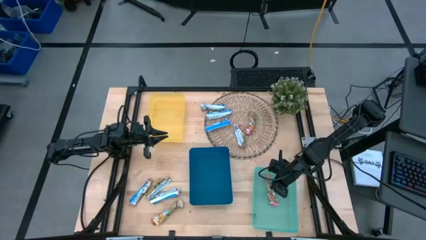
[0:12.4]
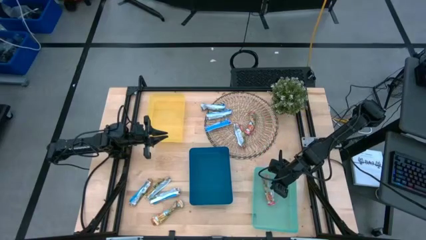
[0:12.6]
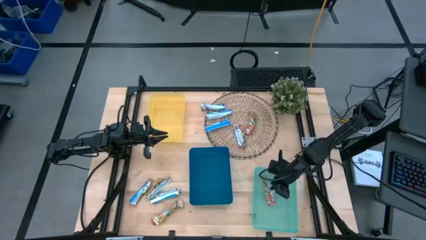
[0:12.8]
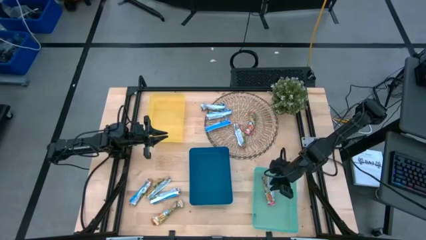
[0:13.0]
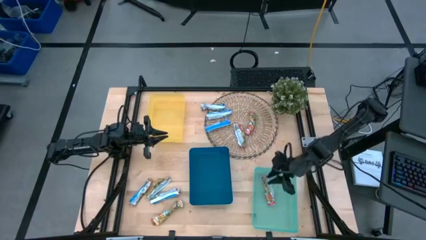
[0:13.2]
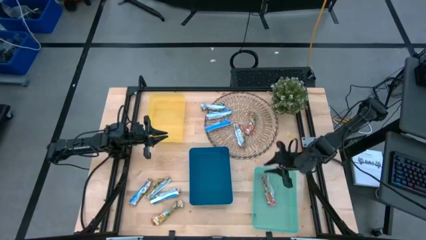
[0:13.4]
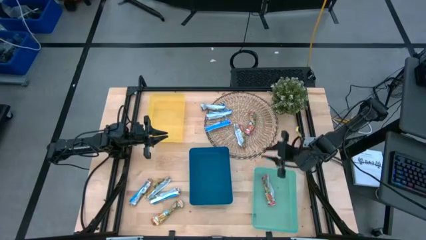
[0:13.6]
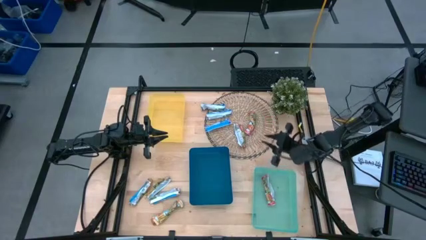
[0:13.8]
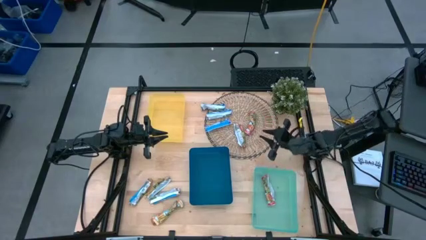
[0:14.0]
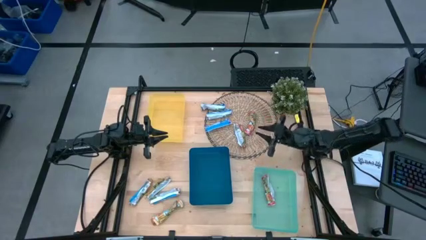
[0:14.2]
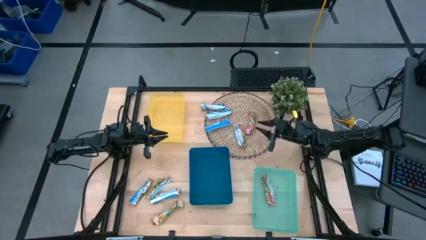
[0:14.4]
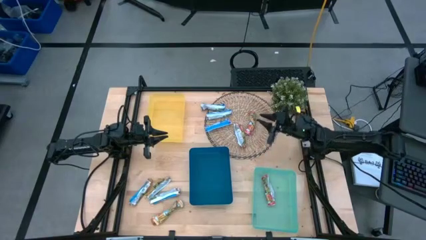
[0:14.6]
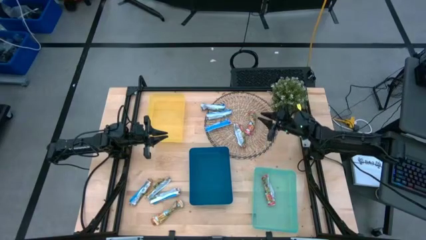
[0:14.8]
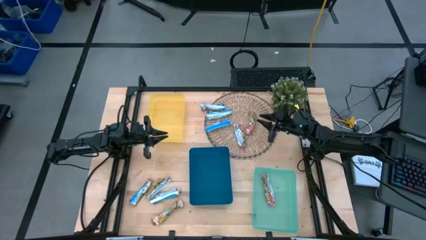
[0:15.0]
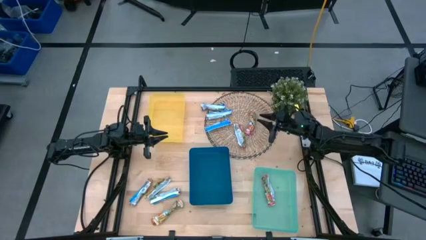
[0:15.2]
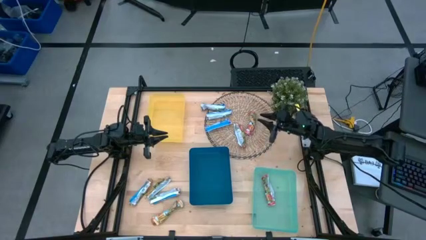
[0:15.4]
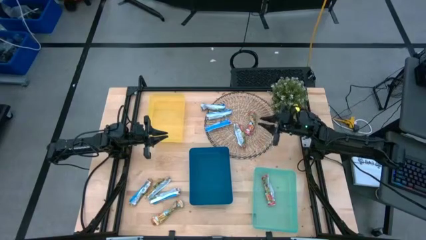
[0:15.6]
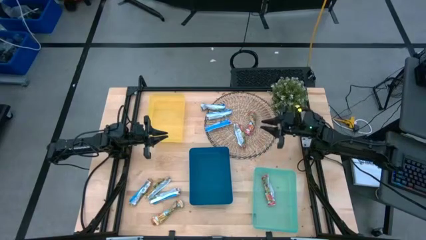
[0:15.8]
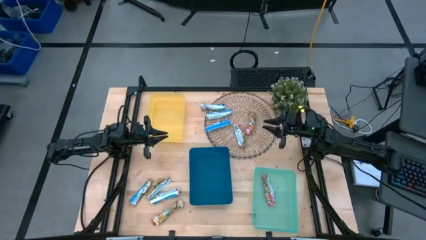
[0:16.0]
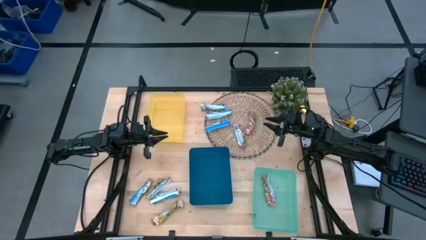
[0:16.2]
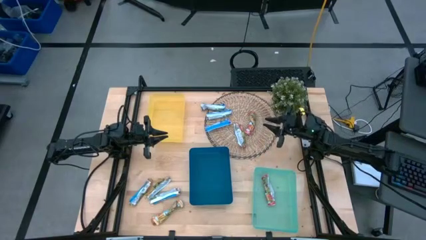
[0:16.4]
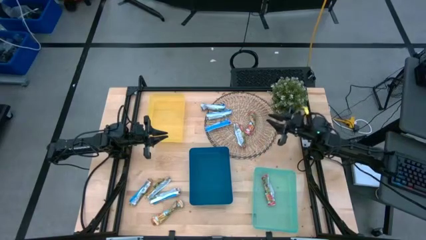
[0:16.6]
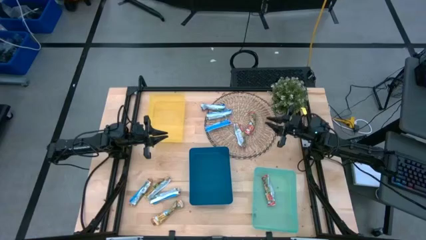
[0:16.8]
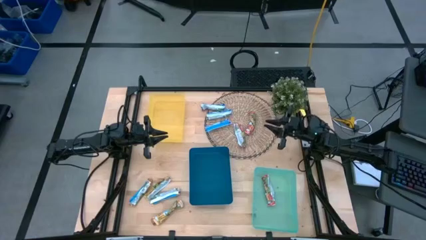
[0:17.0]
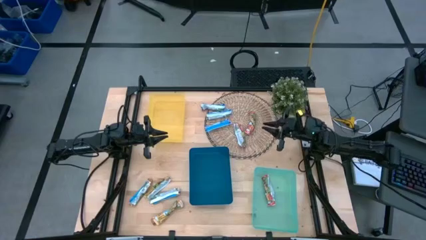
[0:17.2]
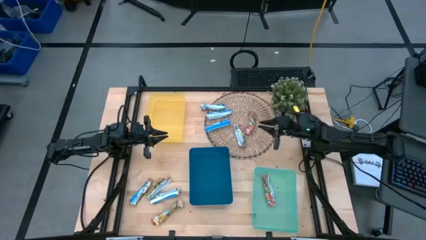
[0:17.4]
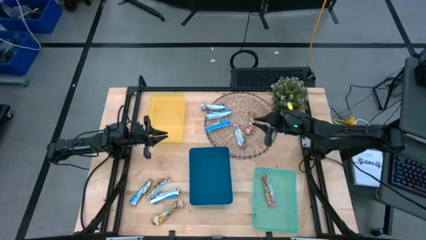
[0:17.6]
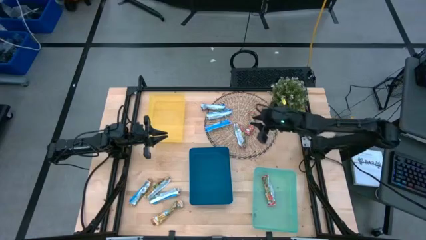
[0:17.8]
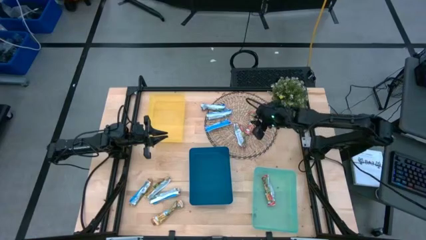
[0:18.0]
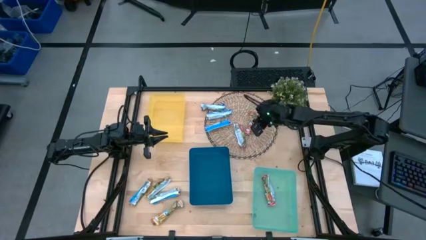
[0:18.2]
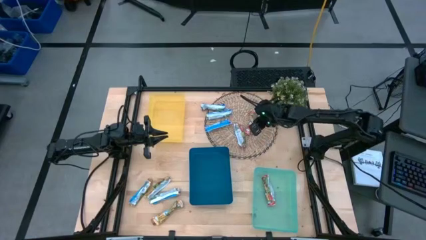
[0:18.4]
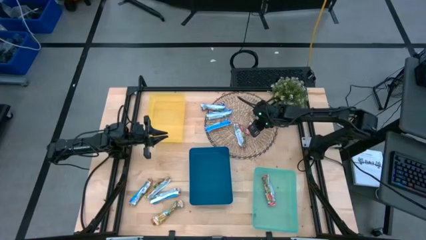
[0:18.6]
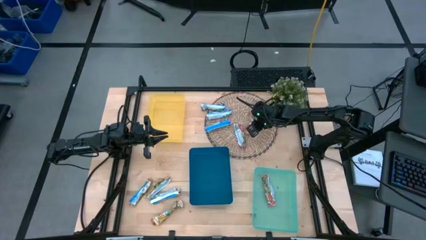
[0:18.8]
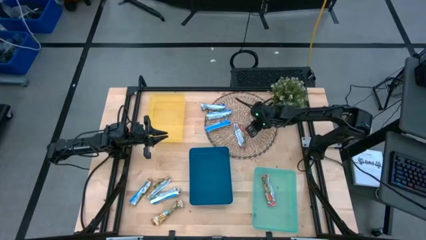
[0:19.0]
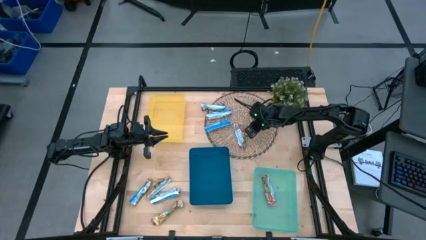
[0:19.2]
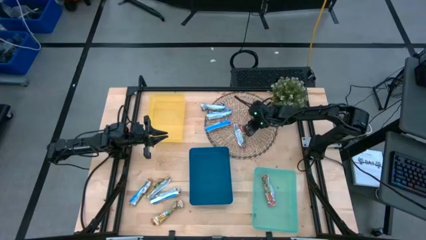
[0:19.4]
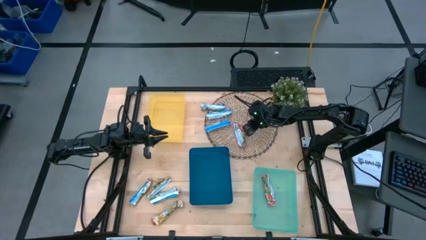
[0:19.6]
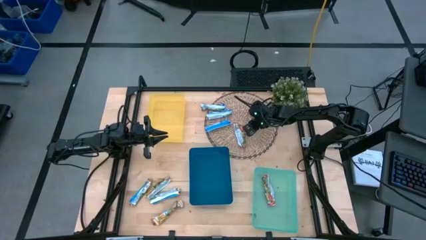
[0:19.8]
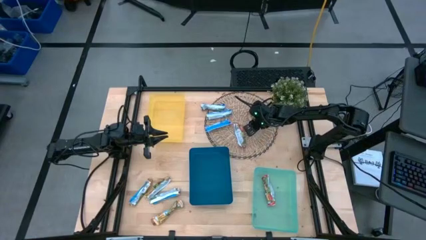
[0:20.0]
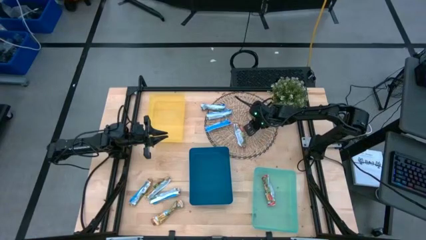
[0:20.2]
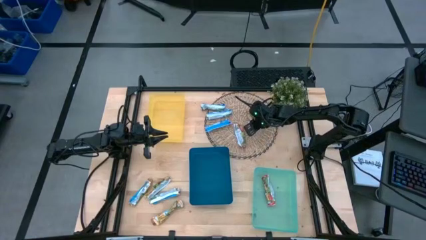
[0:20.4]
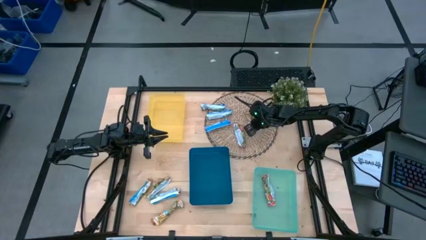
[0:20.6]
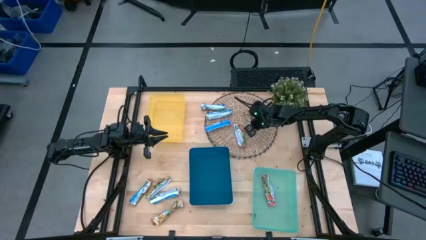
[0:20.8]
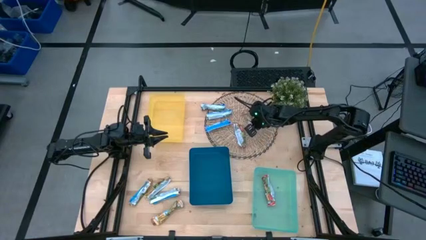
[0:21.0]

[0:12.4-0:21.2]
Task: Pick and place Granola Bars by type
Put the red granola bar into the green bin

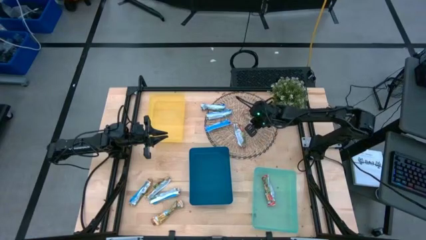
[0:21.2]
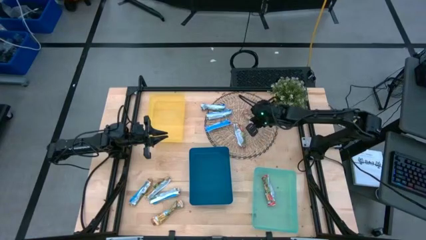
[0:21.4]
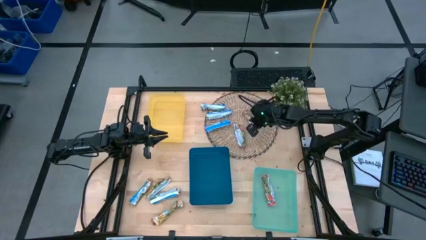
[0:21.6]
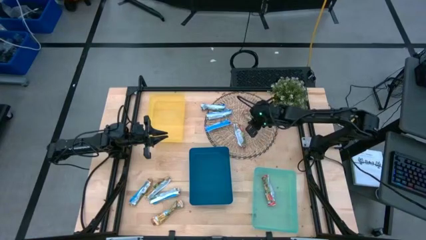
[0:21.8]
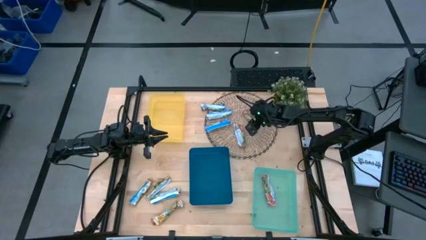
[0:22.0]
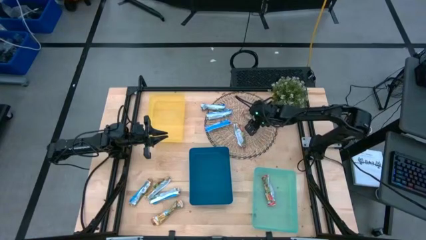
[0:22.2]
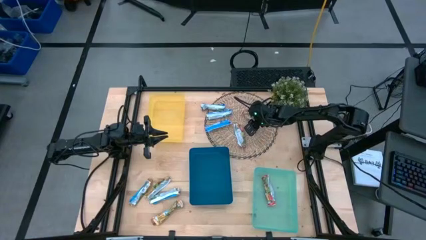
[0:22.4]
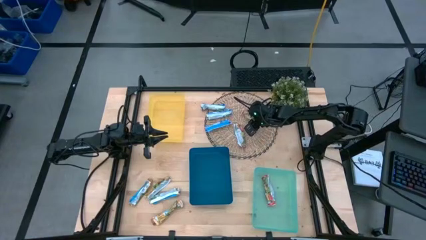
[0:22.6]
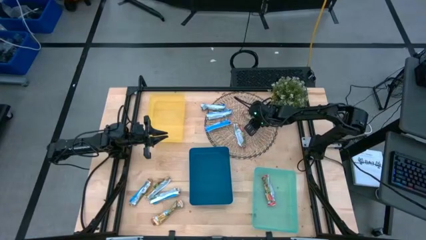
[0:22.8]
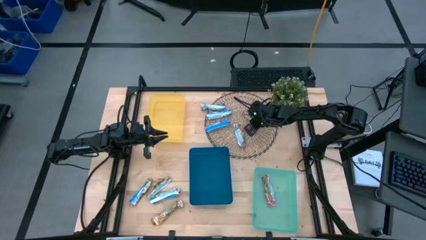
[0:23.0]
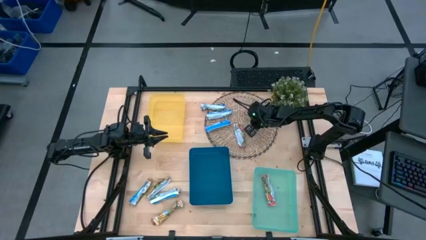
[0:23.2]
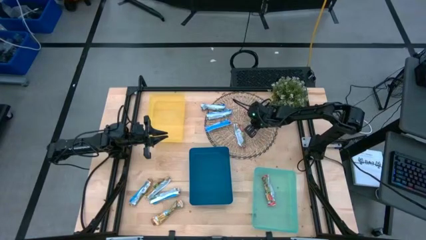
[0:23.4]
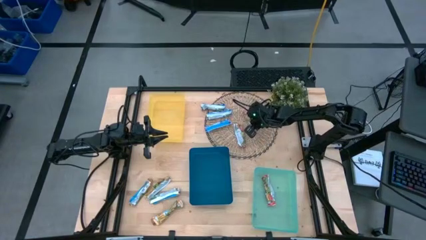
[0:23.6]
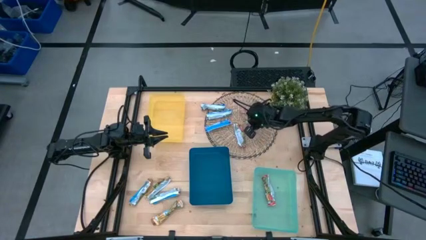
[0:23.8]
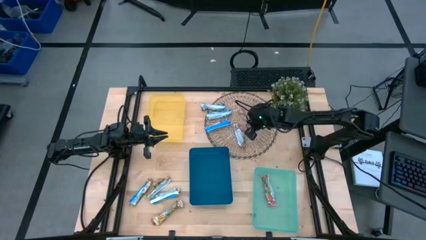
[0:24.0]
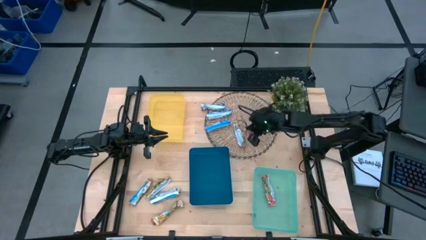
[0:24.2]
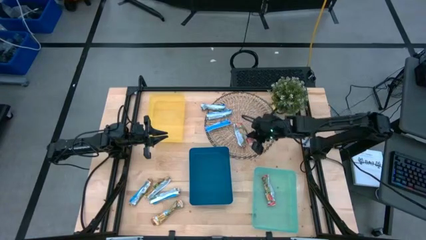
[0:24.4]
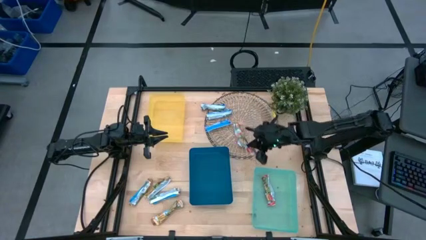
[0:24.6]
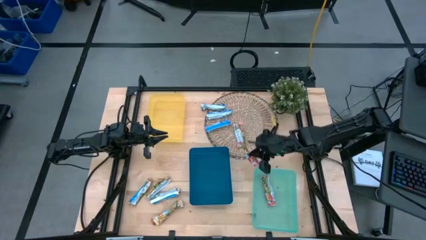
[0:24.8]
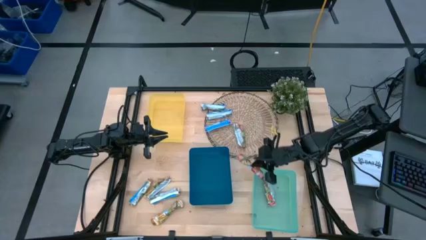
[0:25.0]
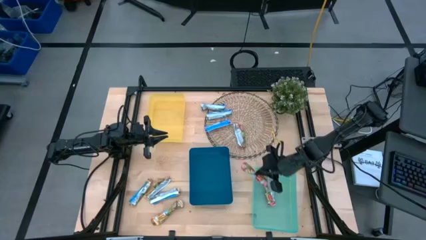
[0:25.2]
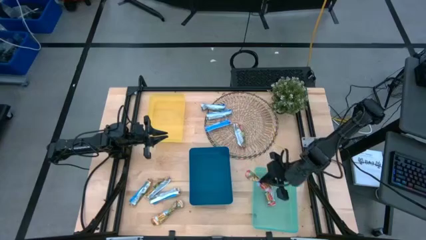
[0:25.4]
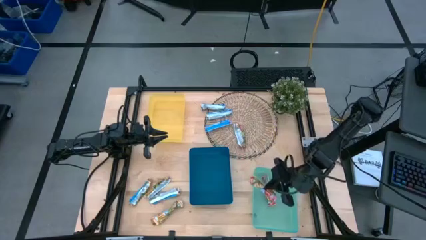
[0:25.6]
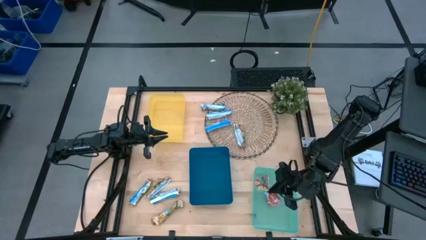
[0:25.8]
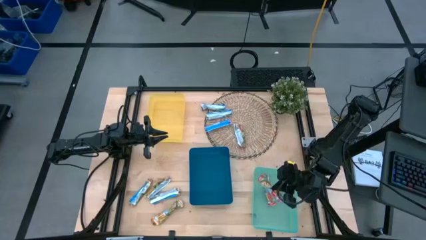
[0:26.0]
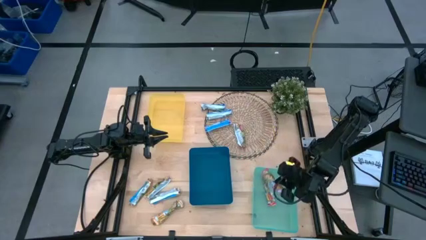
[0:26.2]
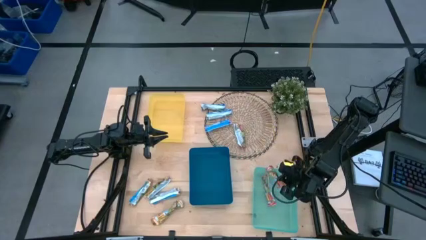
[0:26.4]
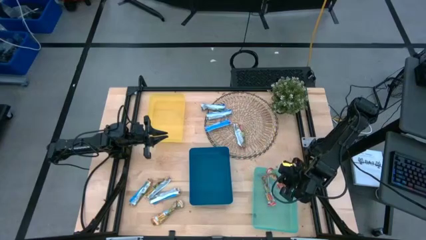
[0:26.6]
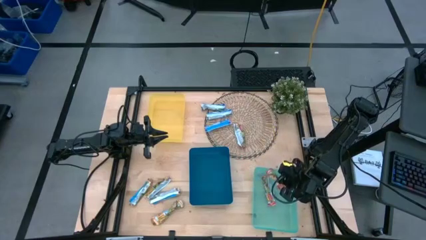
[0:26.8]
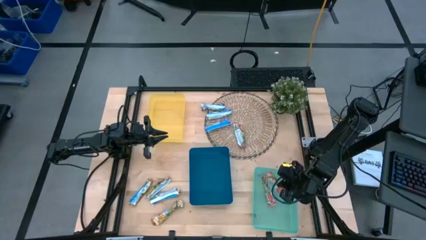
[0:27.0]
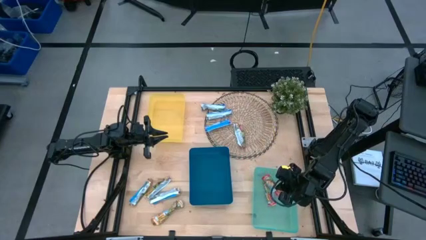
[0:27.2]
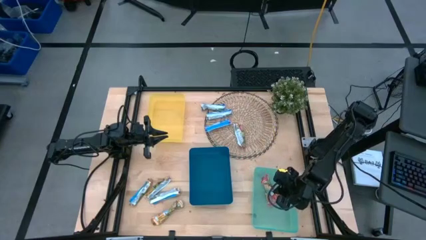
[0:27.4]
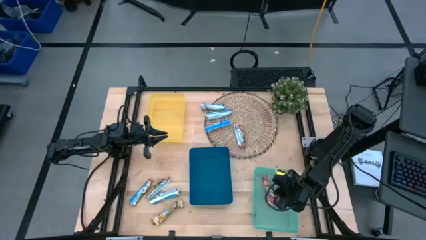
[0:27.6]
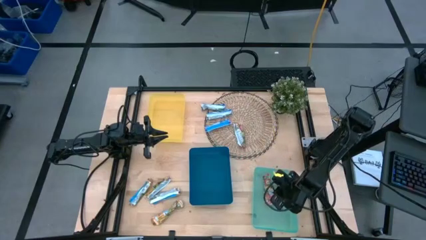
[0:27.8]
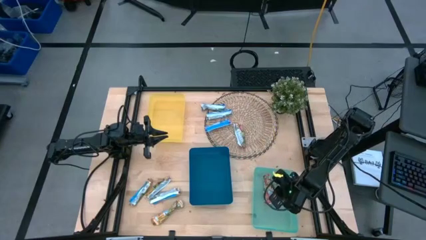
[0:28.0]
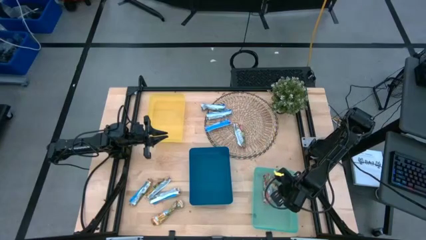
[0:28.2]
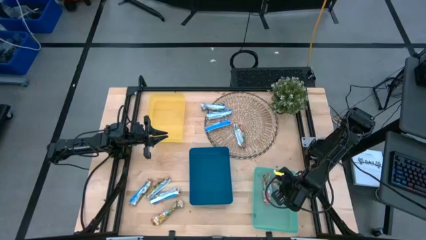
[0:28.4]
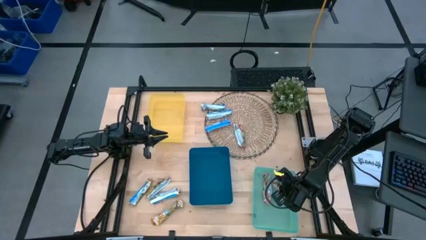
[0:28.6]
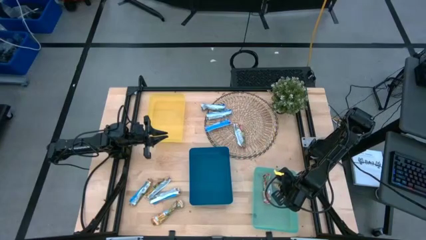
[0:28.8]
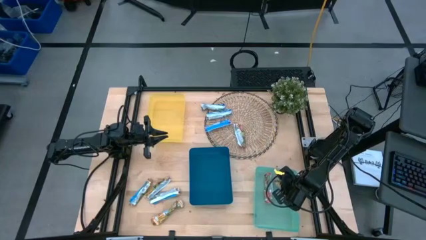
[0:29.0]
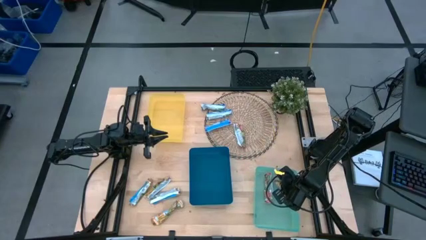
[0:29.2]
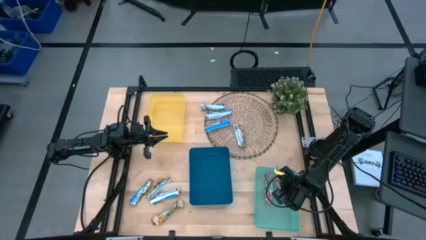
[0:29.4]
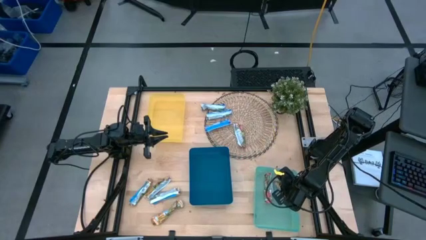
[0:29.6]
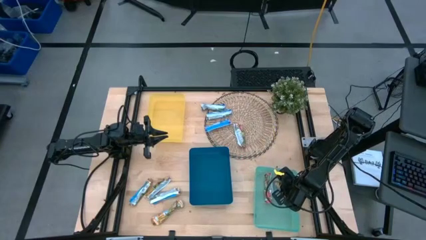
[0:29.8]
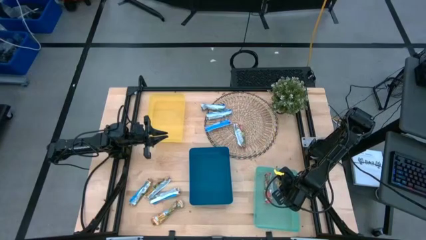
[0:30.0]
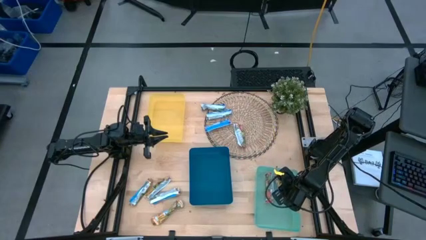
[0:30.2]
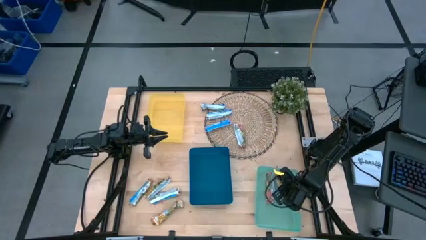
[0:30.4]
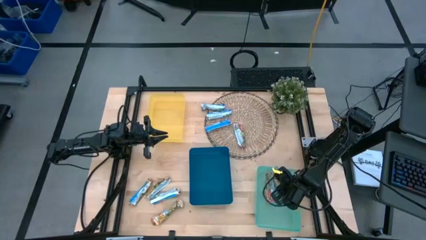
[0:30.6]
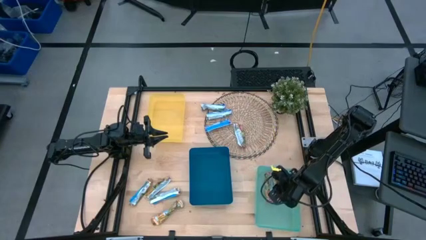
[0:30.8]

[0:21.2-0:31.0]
Put the red granola bar into the green bin
